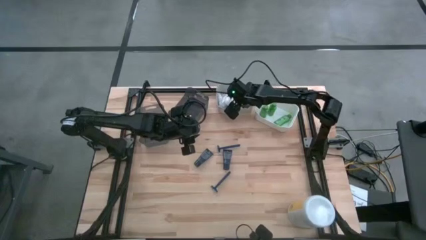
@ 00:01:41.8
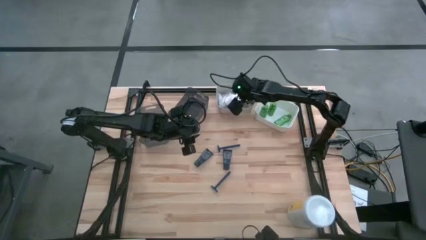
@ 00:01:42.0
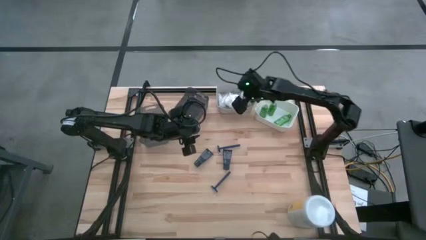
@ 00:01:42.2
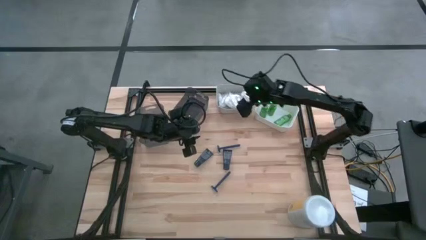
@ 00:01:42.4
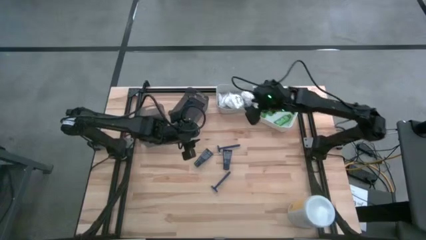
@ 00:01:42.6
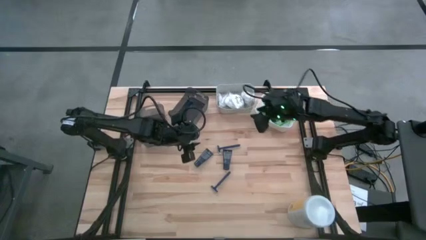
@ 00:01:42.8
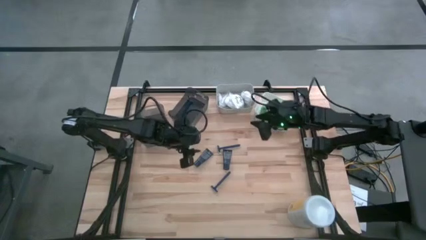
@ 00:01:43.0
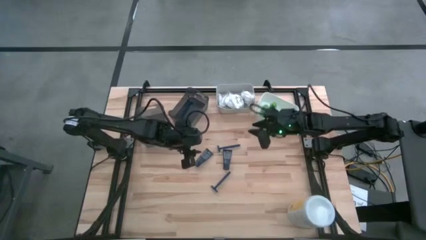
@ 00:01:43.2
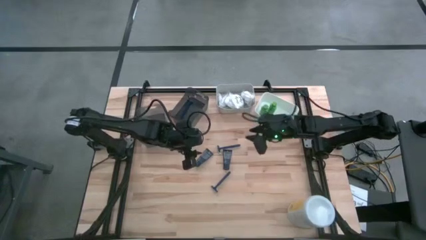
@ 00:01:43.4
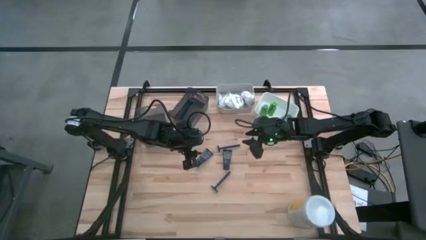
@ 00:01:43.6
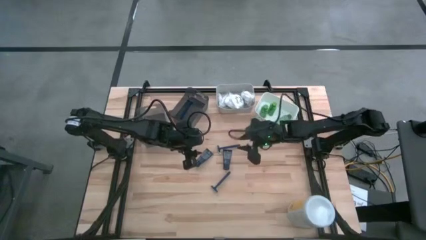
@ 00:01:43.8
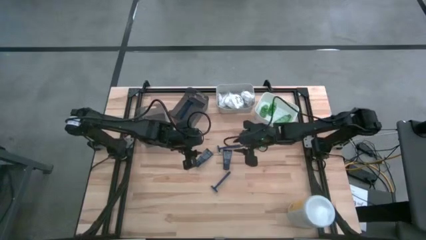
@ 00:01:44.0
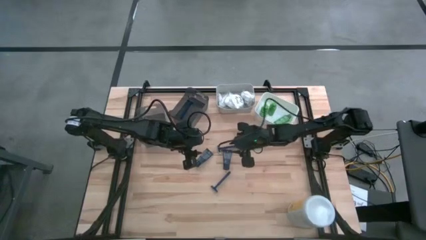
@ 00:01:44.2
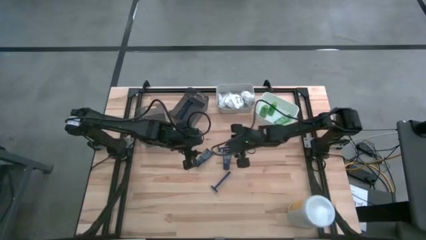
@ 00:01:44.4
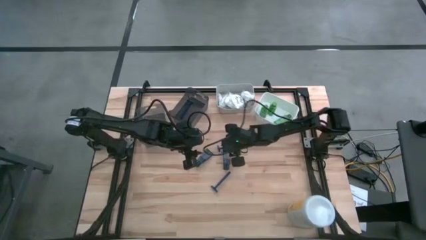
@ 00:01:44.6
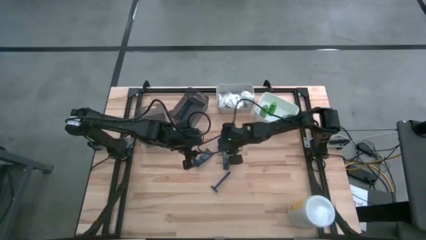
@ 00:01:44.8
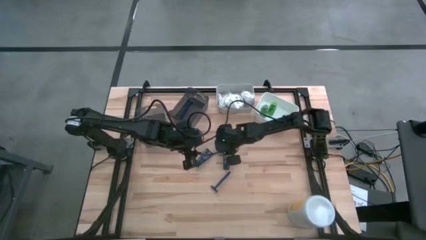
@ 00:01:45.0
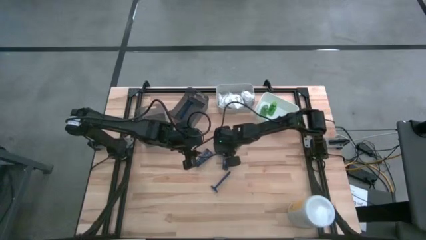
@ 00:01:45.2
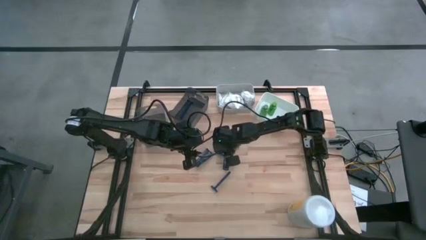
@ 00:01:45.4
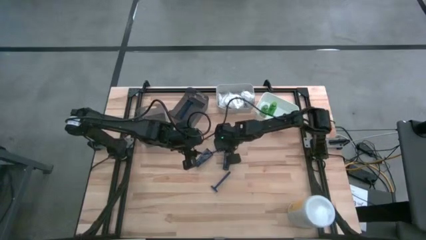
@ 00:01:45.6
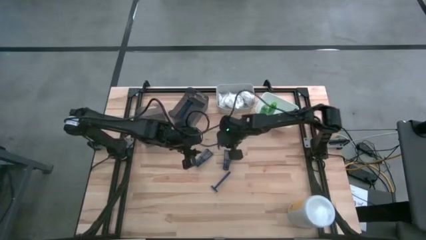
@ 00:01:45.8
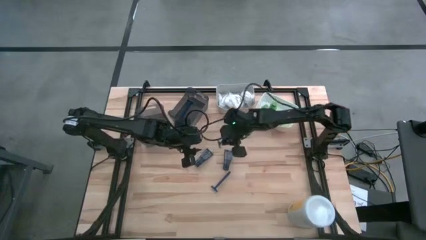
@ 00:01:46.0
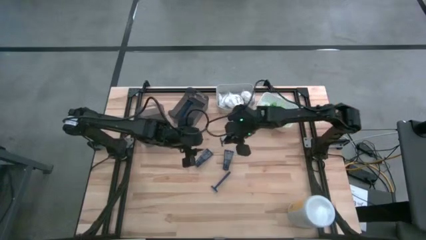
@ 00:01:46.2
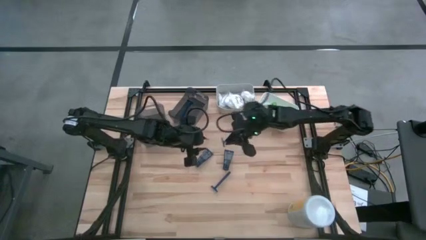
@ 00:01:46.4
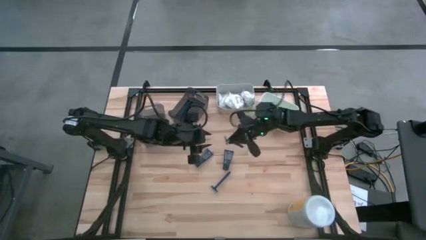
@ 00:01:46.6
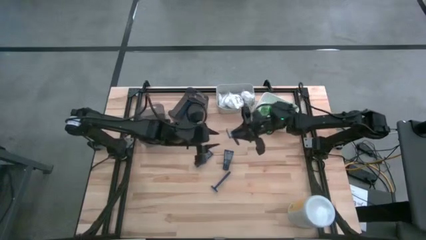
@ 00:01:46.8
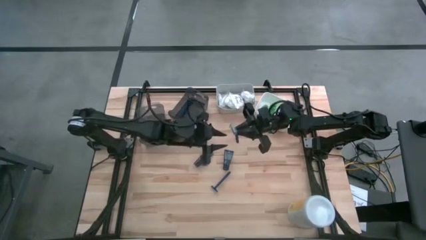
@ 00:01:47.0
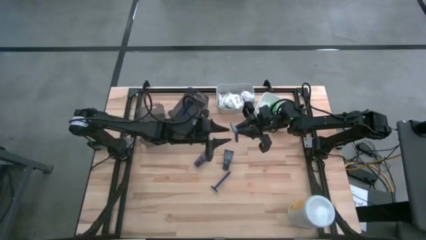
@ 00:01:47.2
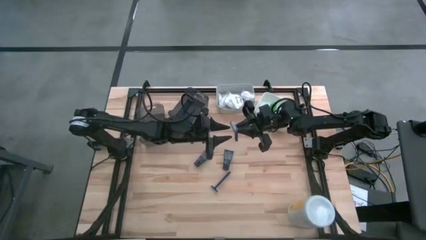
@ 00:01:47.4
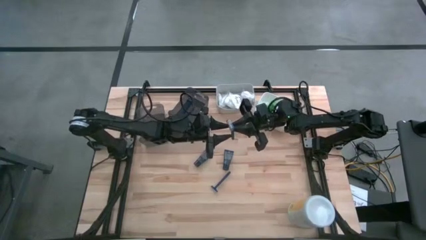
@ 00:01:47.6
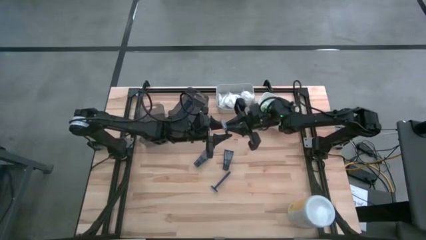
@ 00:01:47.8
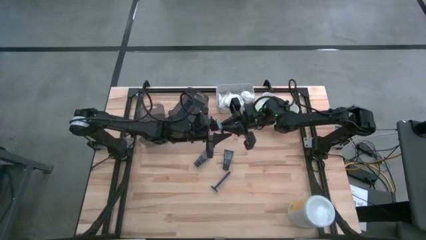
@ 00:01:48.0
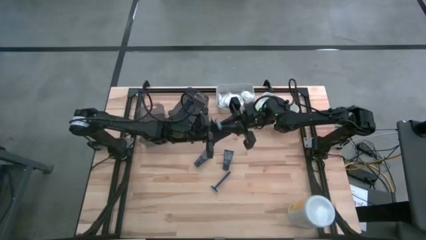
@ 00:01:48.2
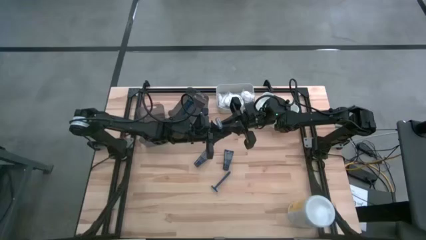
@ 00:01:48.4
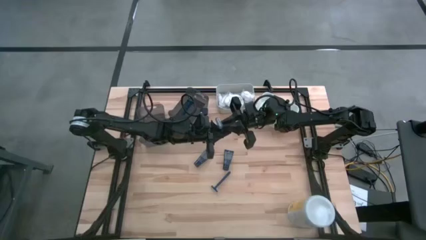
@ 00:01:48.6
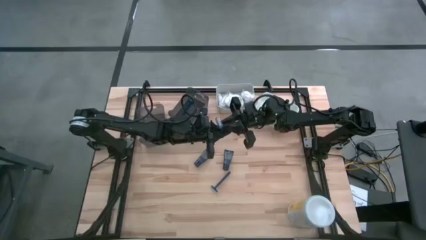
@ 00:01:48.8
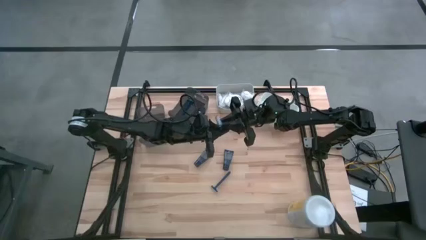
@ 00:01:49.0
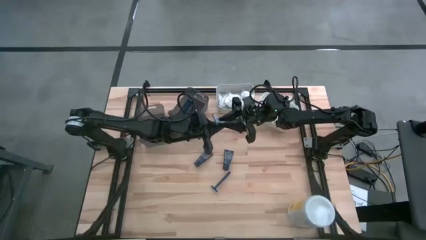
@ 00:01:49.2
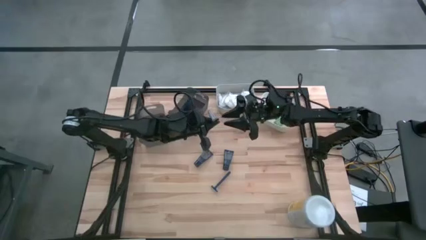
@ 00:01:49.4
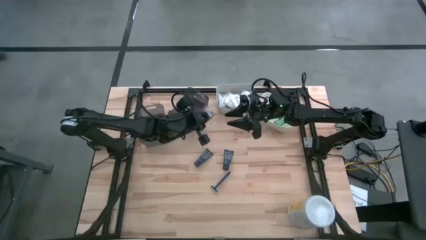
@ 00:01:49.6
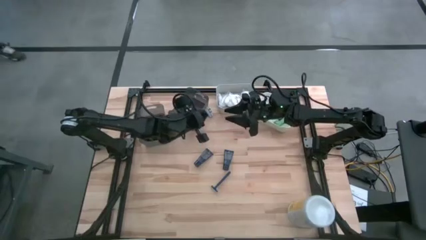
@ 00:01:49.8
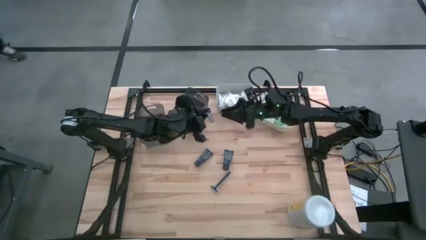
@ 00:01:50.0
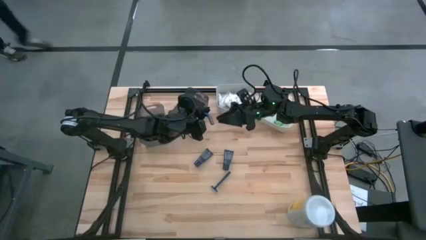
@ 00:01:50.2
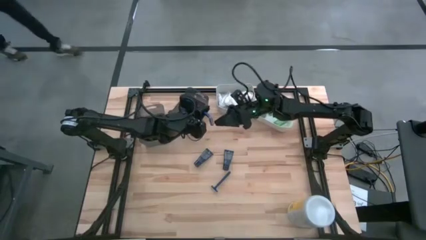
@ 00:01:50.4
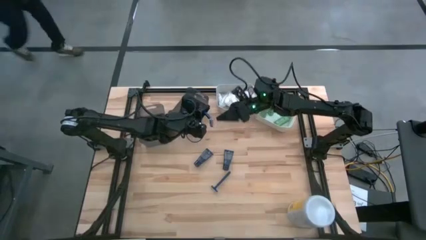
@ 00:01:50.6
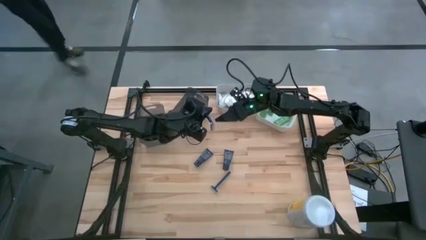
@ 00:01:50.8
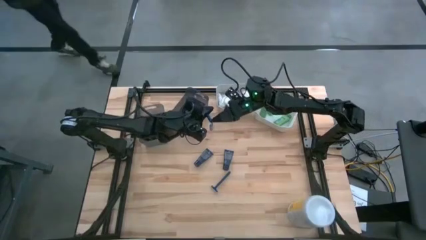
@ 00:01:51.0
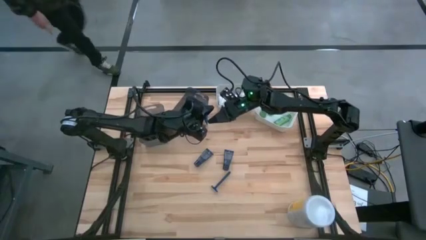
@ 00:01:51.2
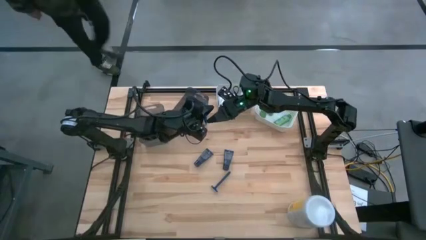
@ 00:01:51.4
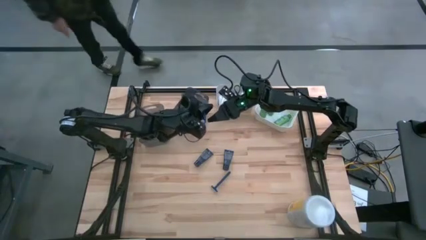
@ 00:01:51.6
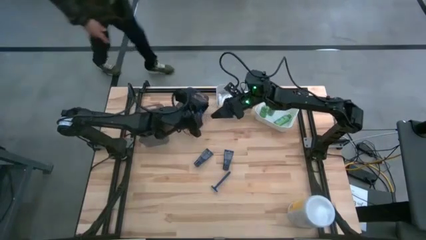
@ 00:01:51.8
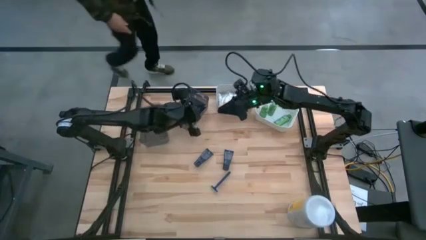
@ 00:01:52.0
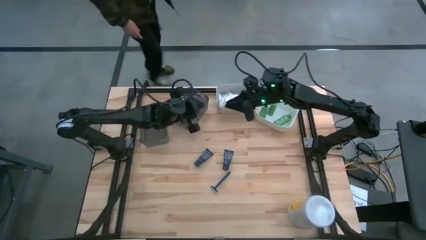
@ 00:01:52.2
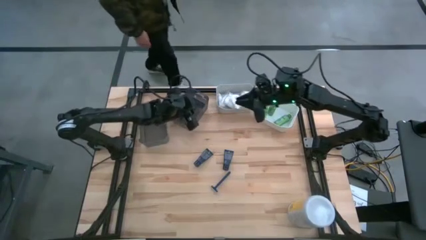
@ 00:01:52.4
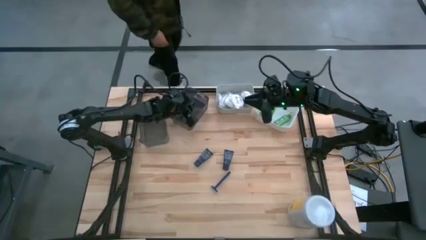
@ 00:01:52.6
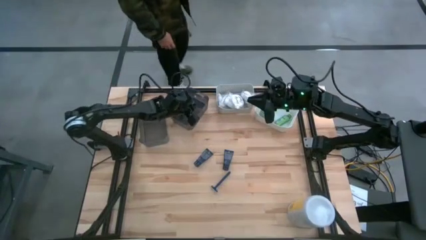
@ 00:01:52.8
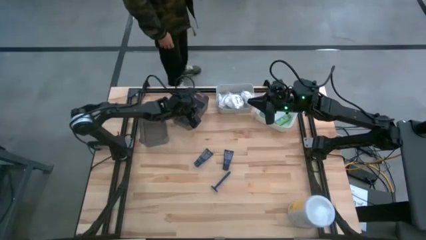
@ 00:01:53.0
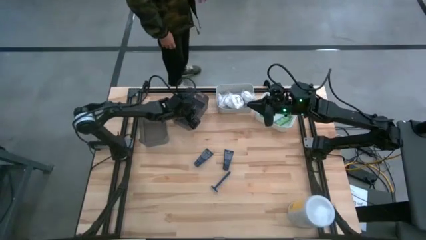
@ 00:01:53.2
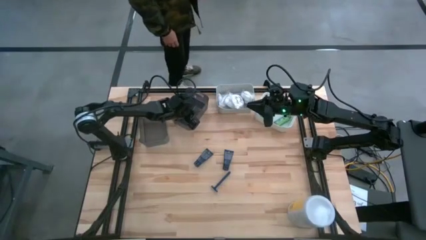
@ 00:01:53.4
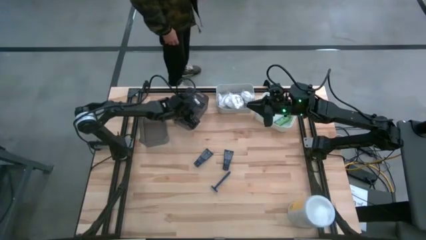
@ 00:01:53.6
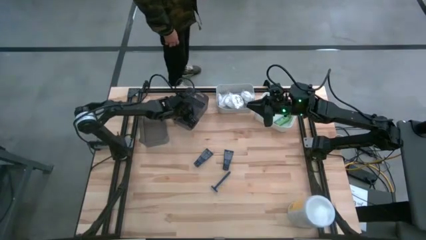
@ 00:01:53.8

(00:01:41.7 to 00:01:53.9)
Task: Pick & Place Travel size toiletries
Put the top razor into the right black bin
